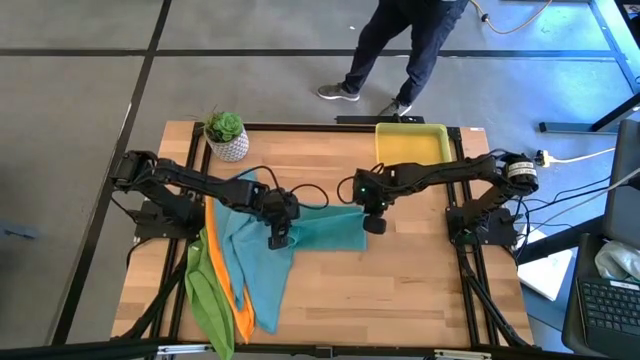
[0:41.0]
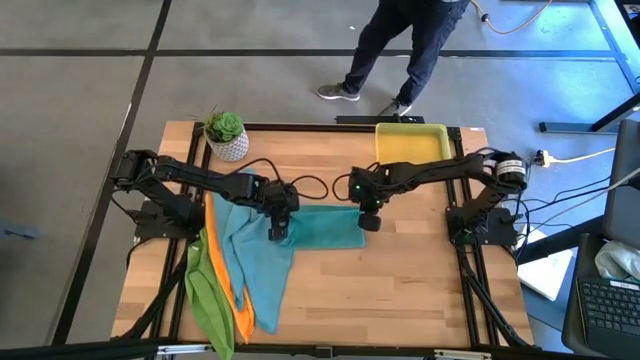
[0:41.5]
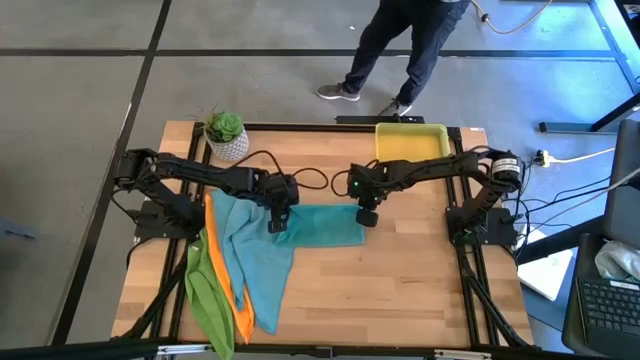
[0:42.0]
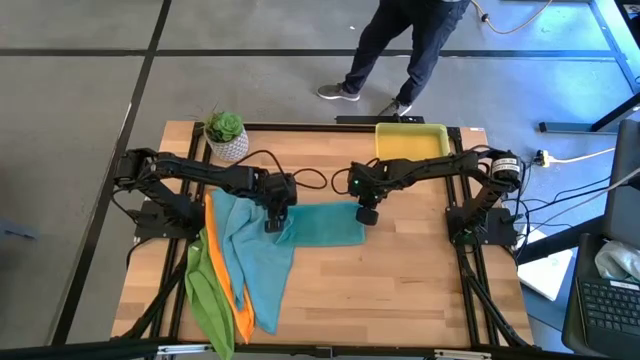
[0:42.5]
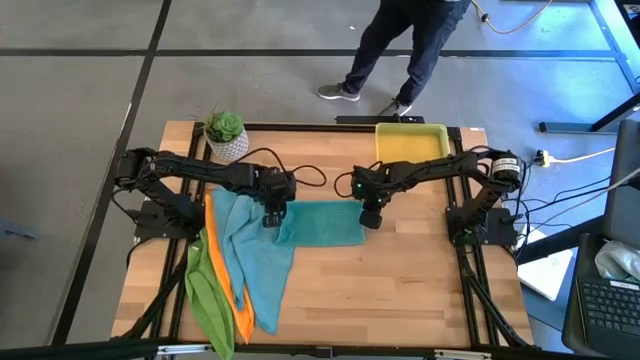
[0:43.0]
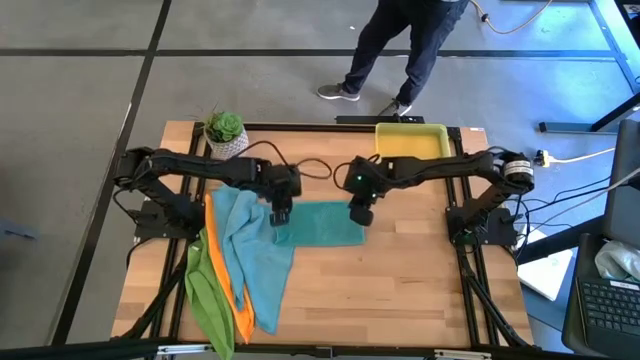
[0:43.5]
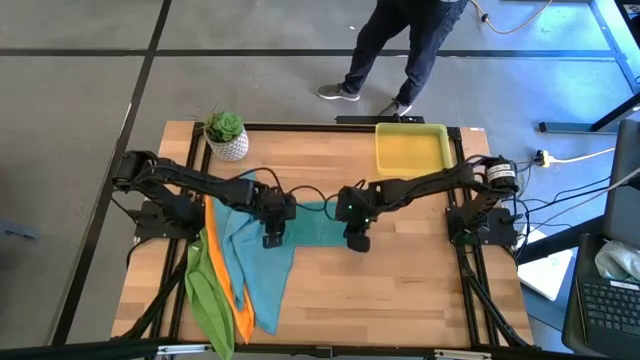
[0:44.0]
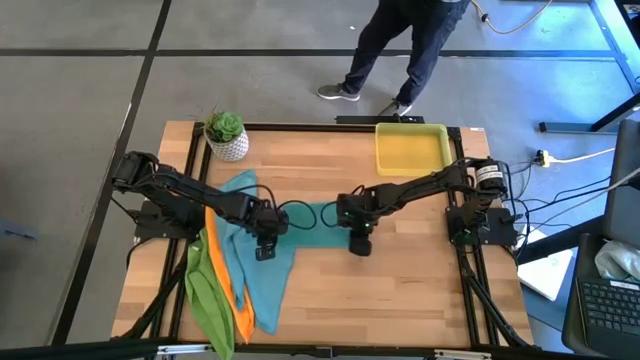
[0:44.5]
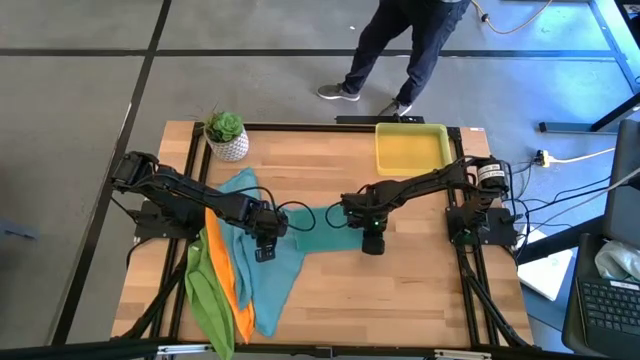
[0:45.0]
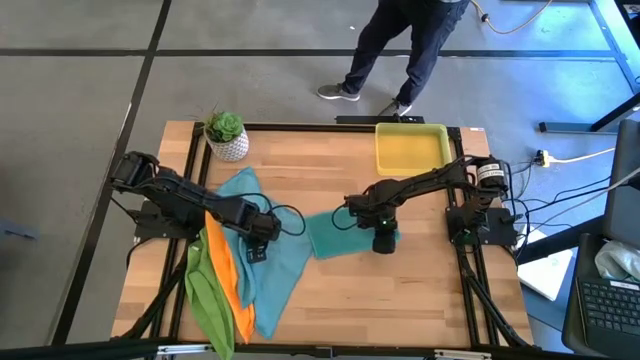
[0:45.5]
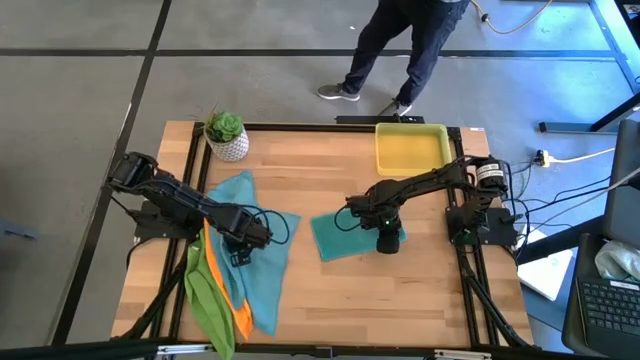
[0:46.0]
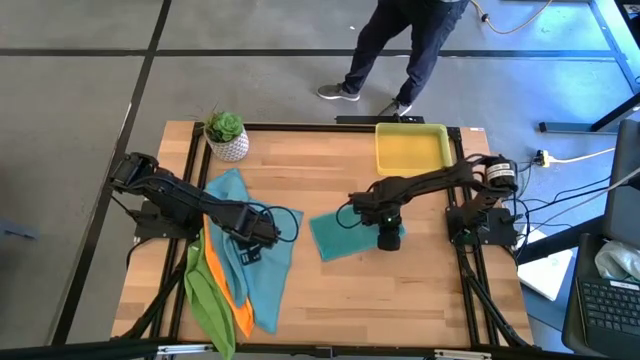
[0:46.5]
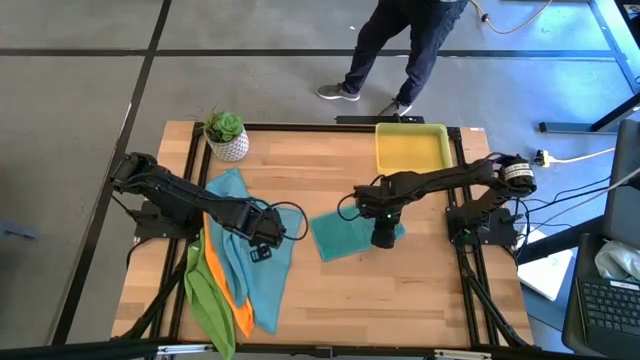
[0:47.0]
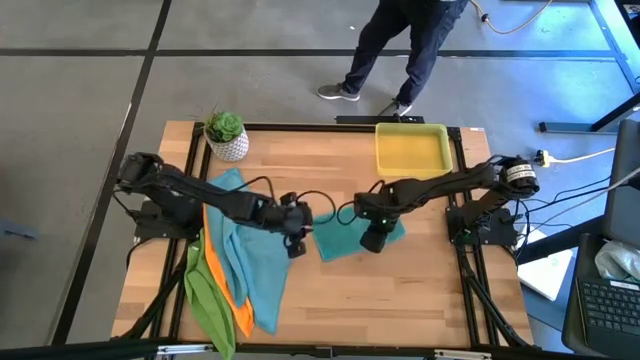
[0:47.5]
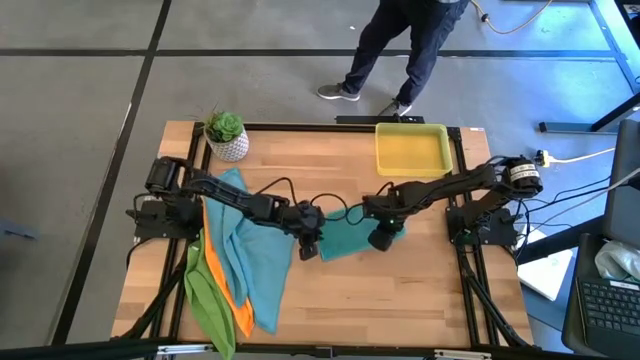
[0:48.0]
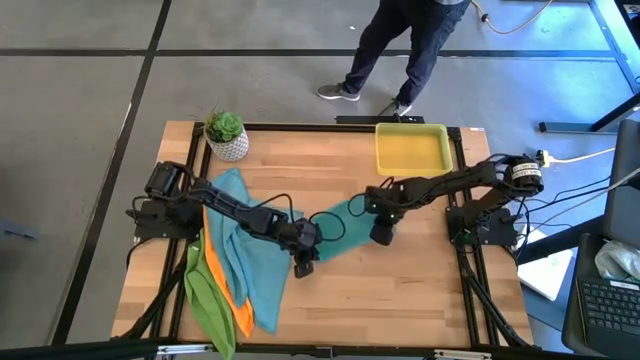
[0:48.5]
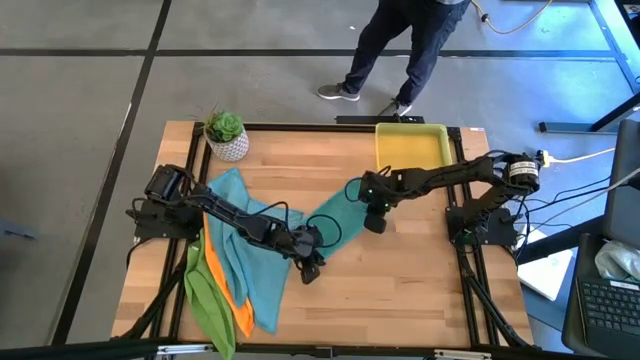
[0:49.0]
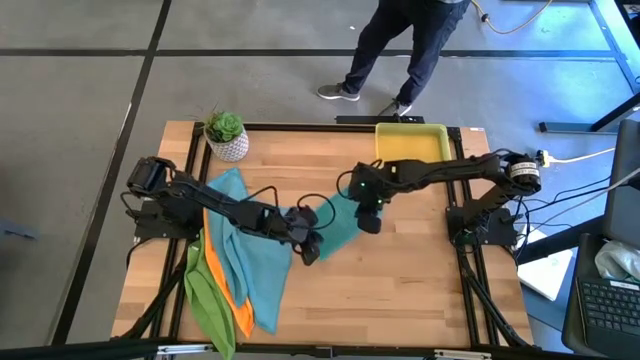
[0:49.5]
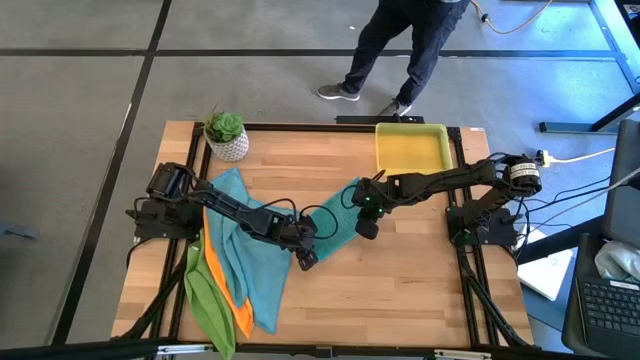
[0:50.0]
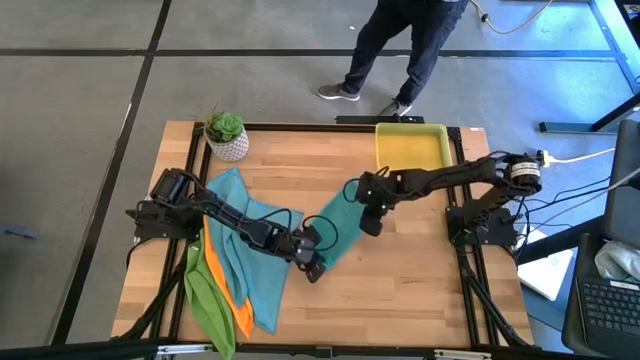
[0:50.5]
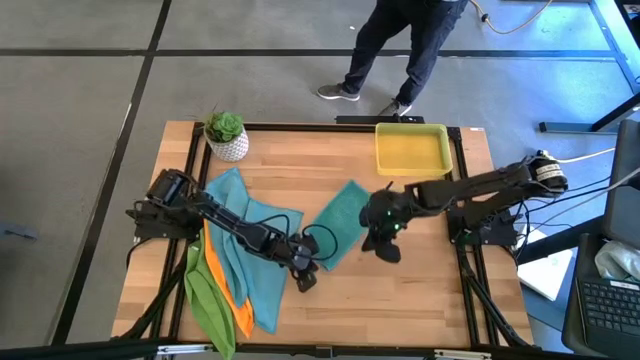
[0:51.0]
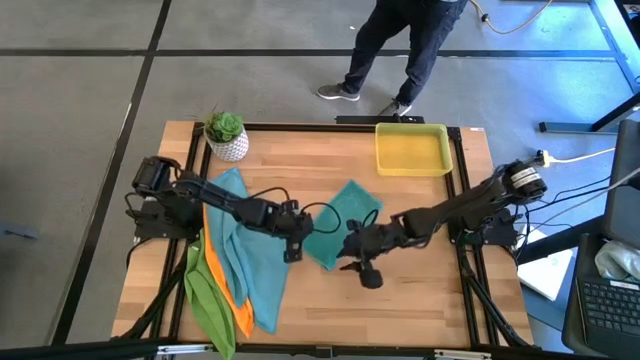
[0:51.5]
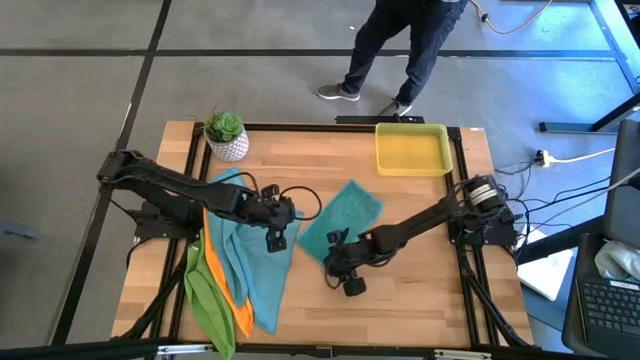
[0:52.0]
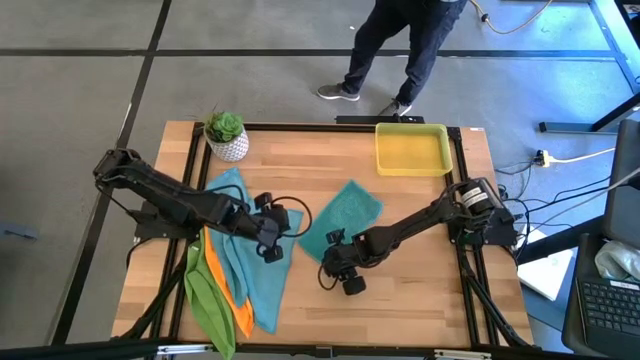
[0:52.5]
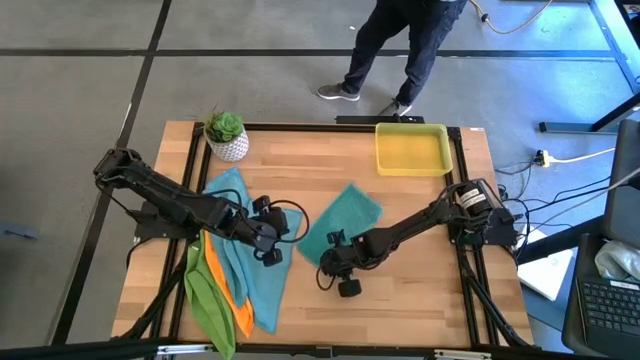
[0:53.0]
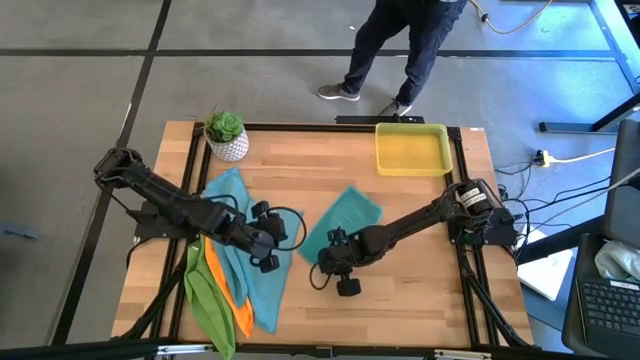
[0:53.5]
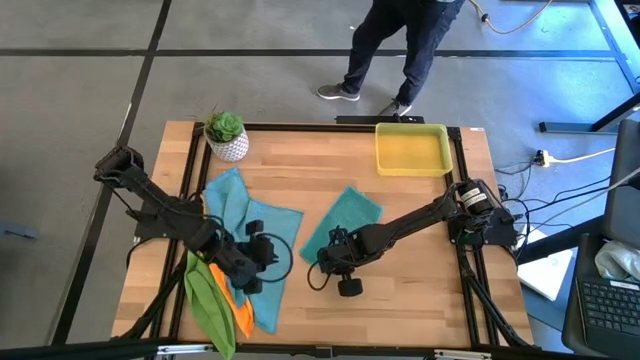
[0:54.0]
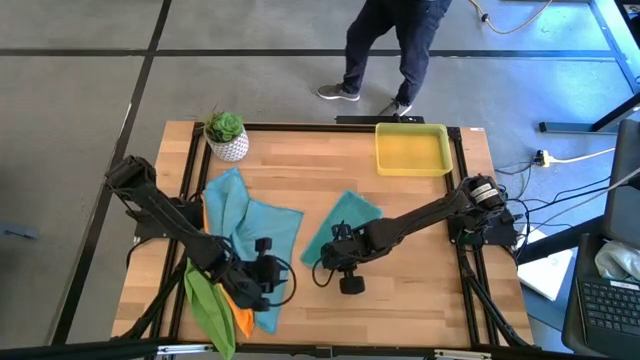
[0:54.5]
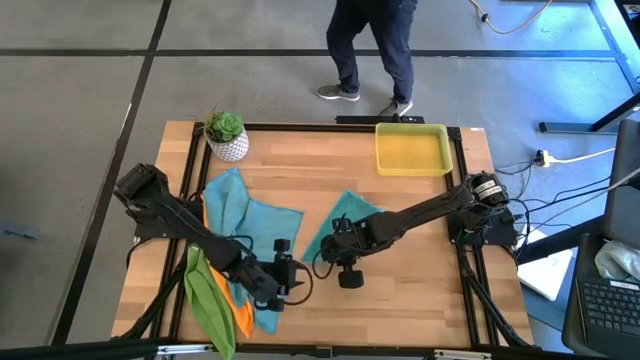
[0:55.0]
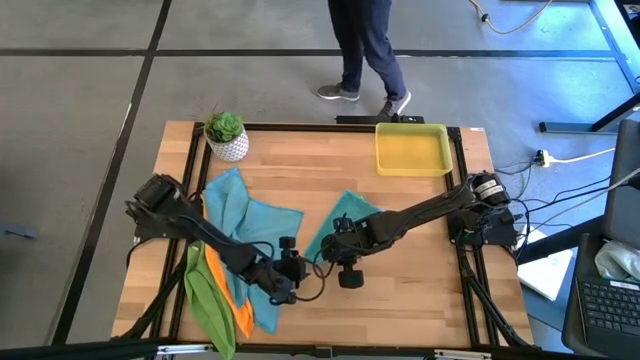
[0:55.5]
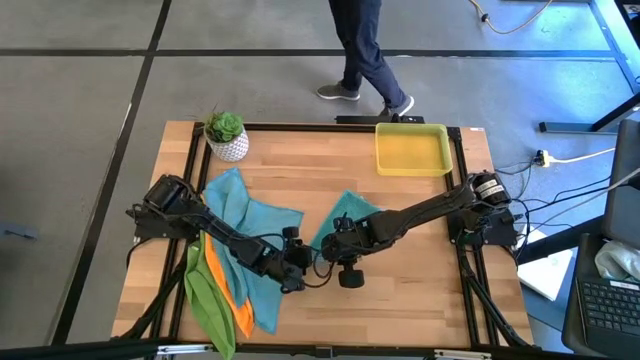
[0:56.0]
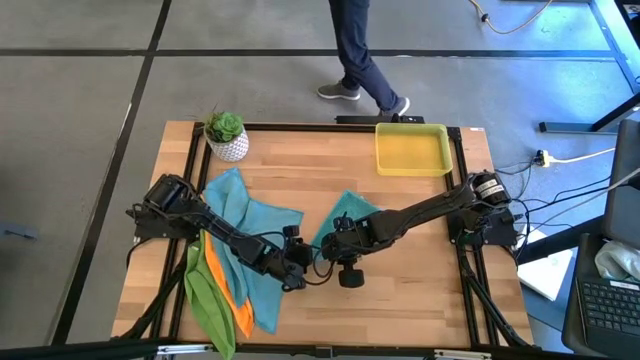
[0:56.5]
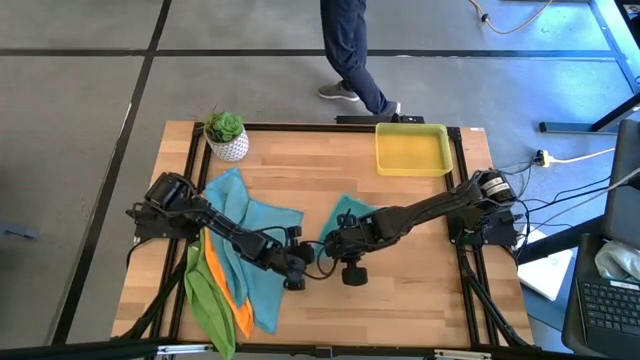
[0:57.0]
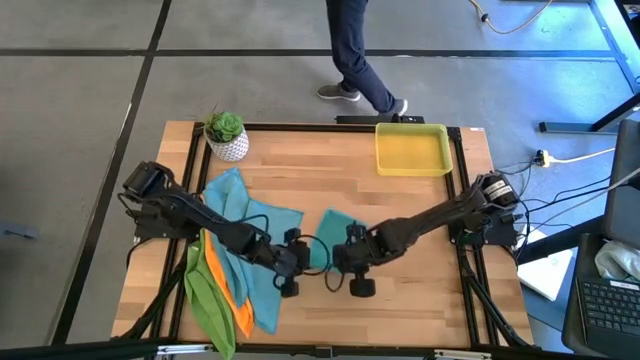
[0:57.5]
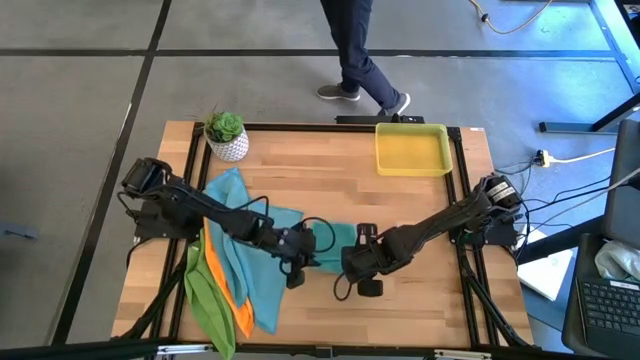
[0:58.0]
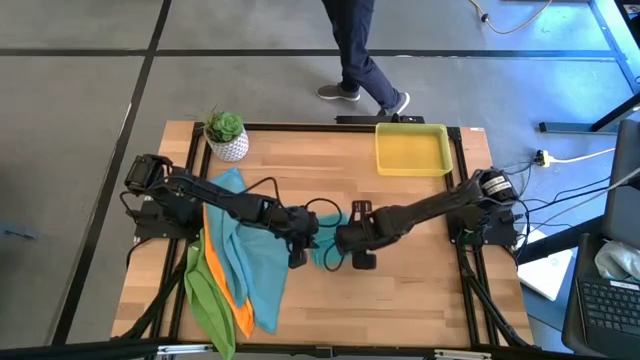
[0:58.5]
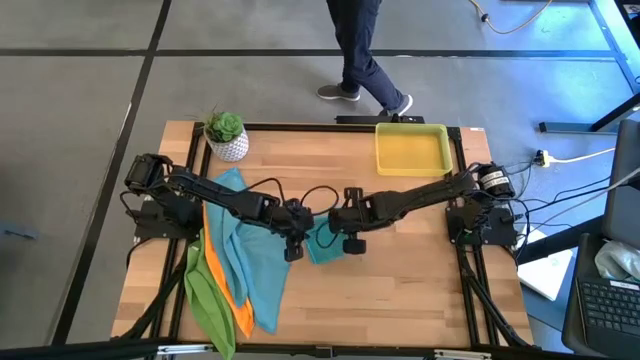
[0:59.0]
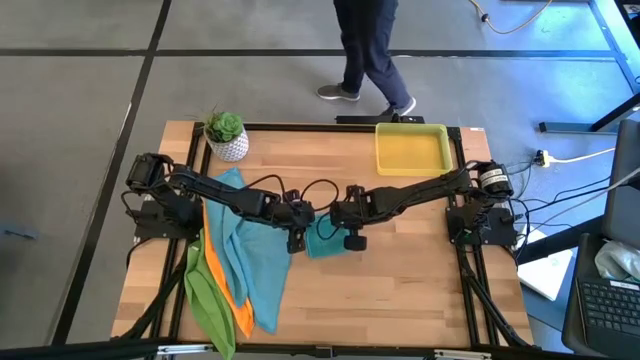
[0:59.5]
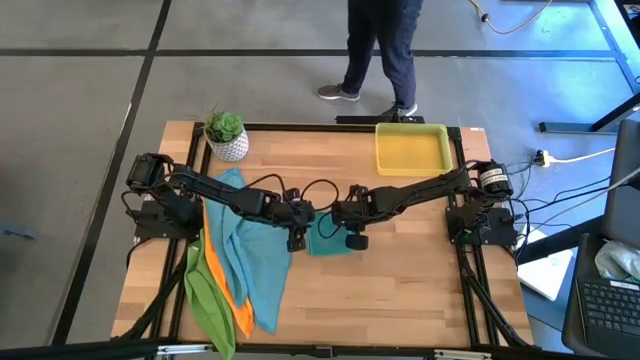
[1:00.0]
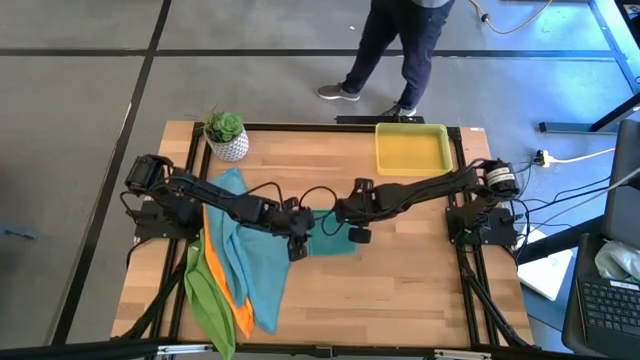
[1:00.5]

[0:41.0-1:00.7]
Task: Fold microfiber towels
Fold the right blue microfiber towel

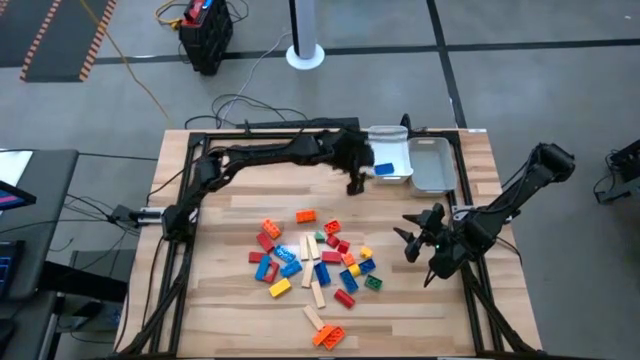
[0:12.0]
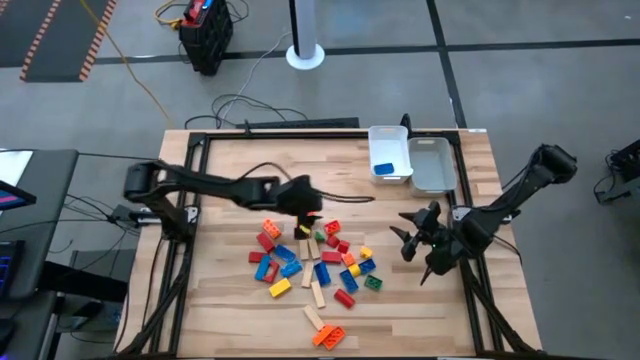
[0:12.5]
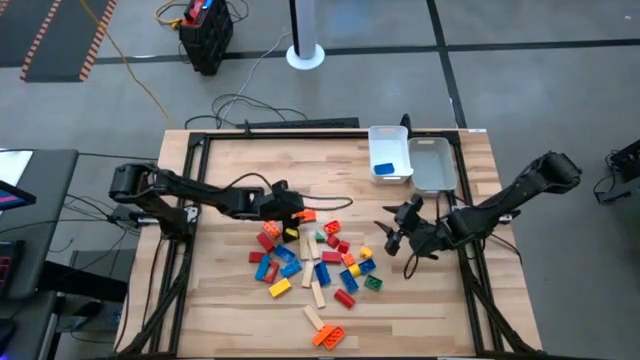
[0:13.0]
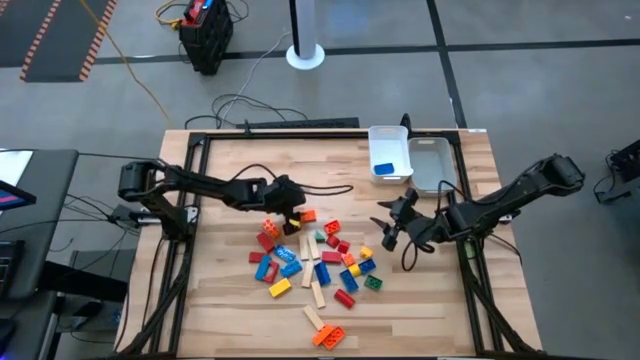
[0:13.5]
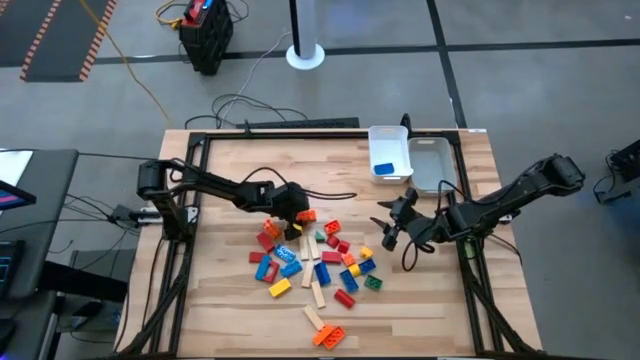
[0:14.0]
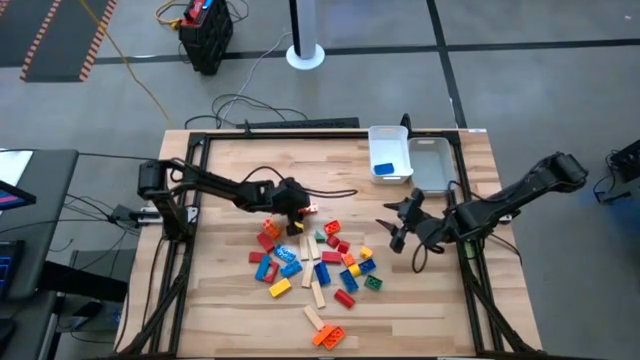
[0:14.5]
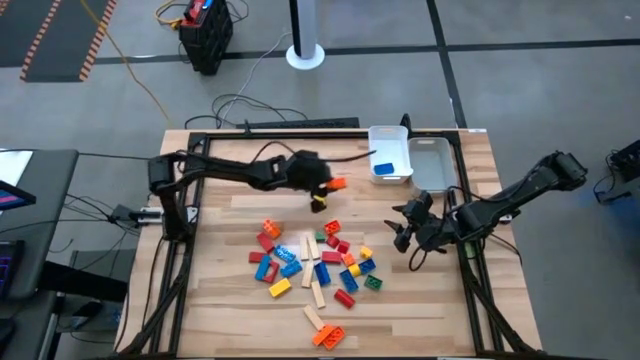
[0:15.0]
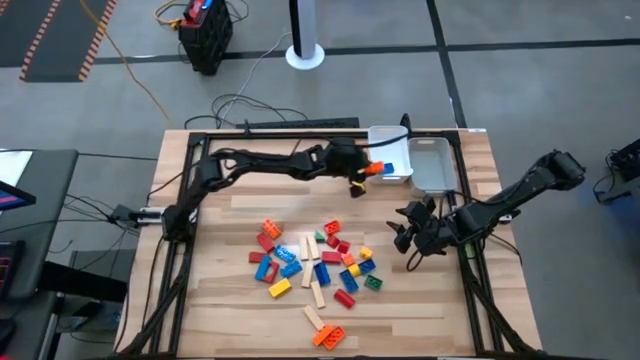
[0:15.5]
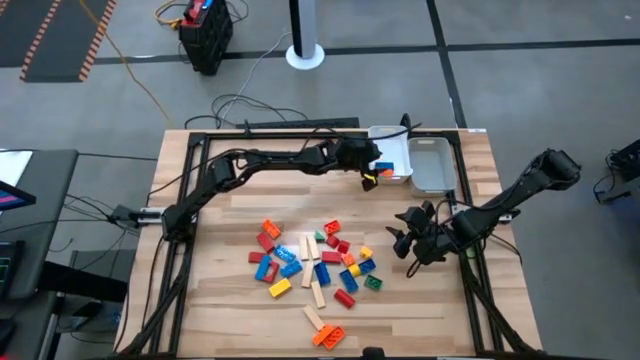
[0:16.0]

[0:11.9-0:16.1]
Task: Sort blocks by size
Put the large orange game piece into the white bin
